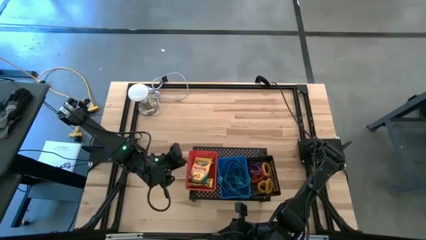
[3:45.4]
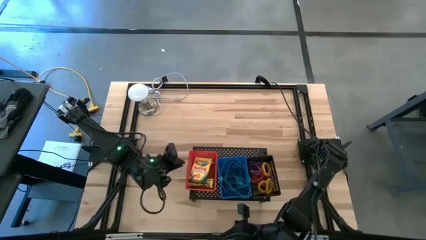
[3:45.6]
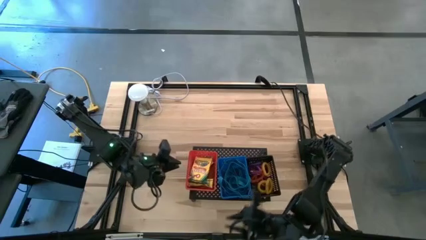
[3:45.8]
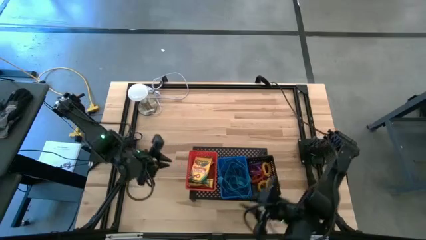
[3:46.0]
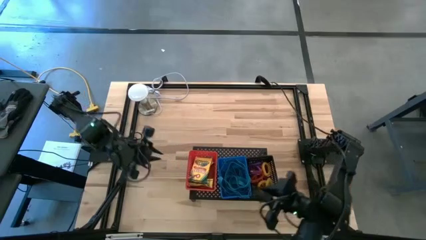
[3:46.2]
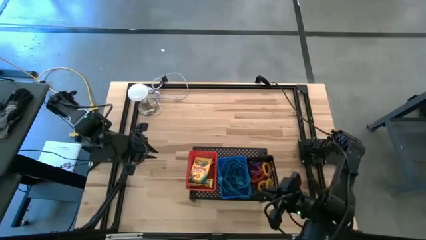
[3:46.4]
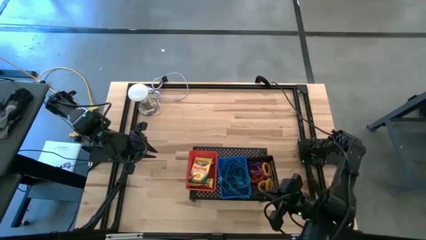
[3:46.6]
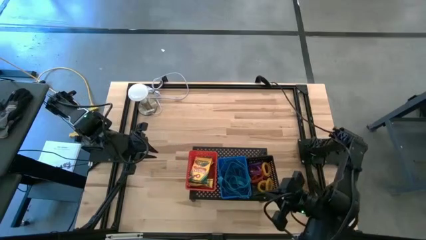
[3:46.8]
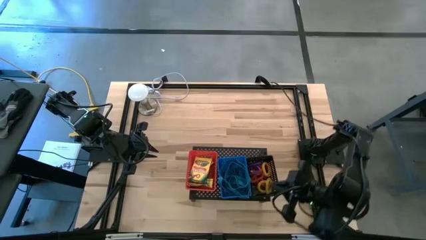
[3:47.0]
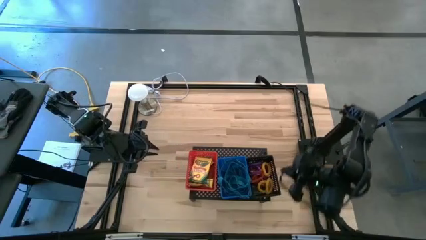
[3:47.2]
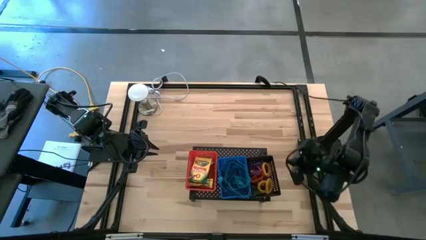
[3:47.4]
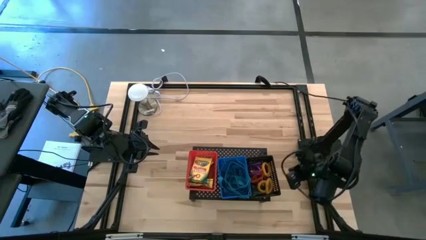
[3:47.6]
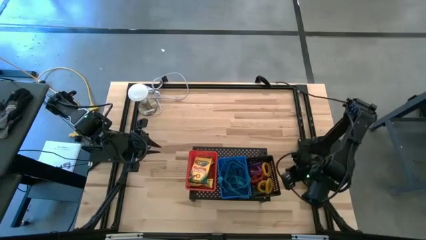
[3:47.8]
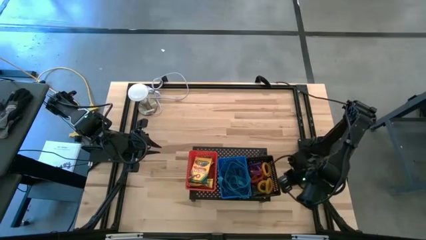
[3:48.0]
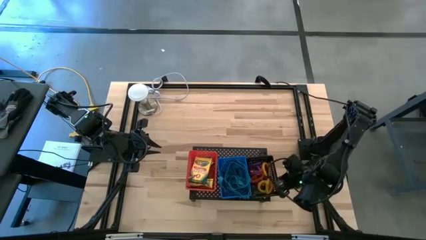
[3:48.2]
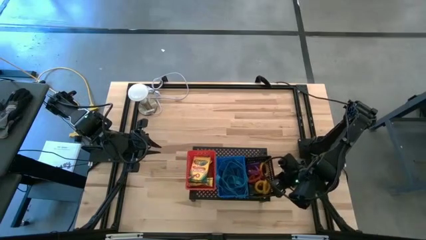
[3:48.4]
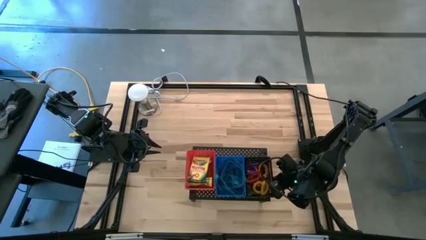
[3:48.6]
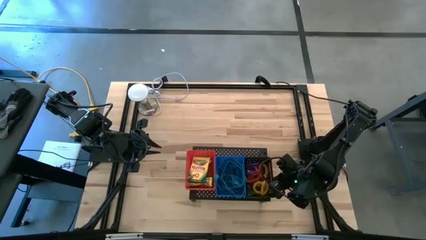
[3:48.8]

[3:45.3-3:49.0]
Task: Pick & Place Office Desk Supplies
Adjust the black bin

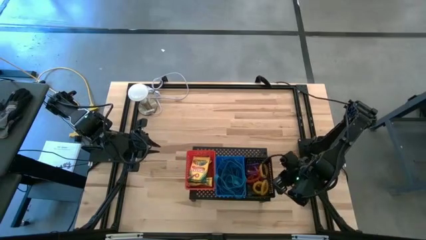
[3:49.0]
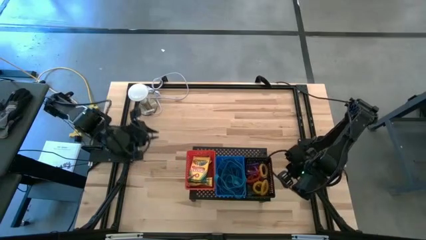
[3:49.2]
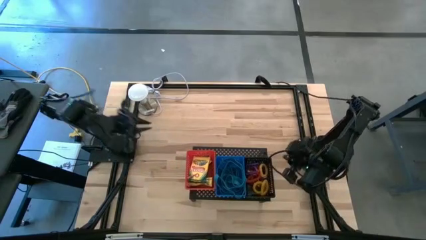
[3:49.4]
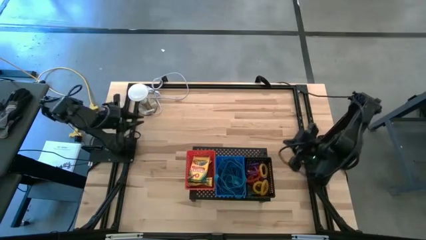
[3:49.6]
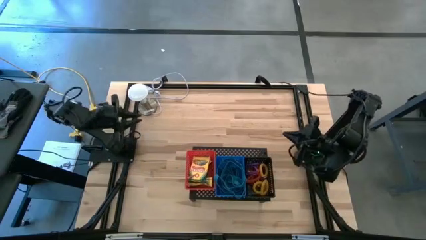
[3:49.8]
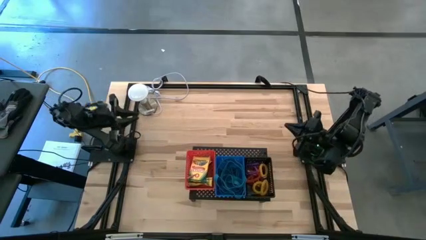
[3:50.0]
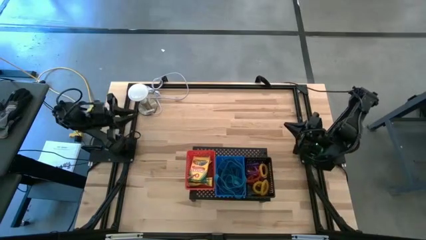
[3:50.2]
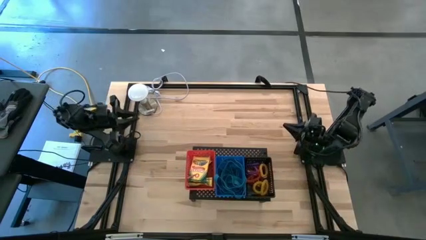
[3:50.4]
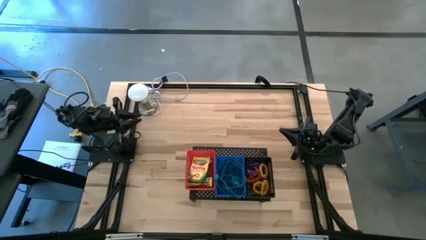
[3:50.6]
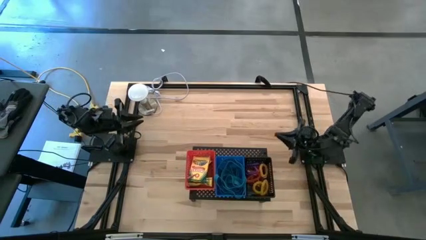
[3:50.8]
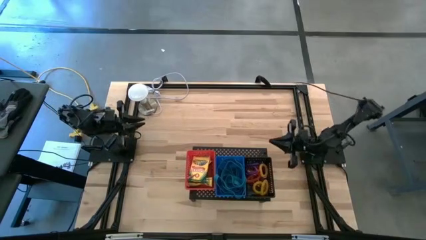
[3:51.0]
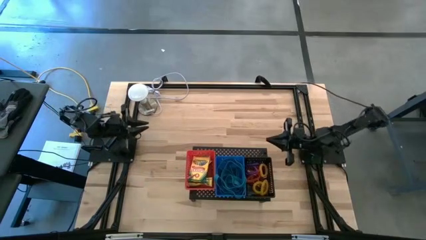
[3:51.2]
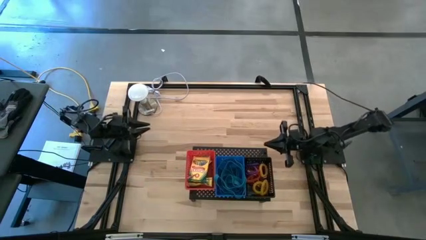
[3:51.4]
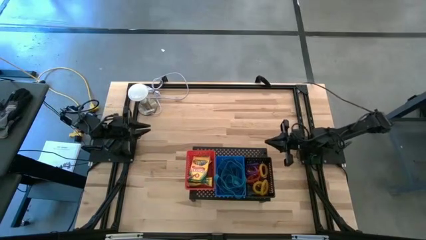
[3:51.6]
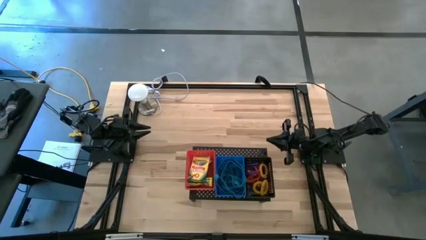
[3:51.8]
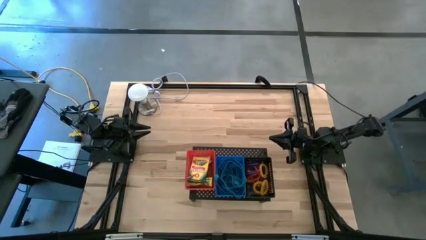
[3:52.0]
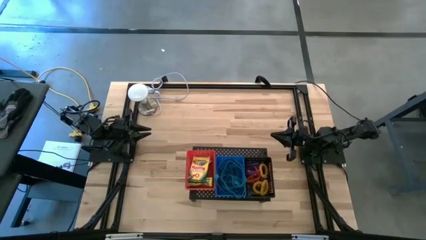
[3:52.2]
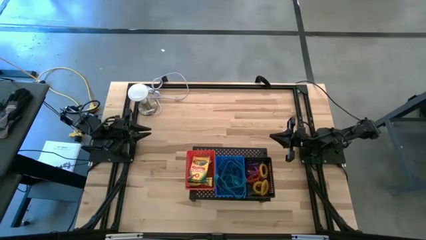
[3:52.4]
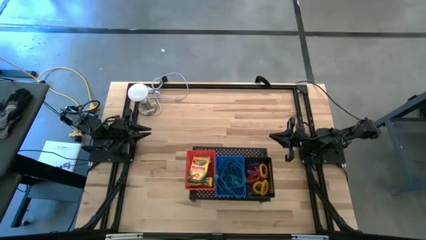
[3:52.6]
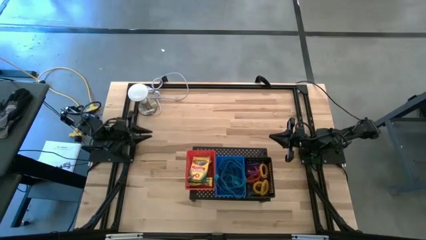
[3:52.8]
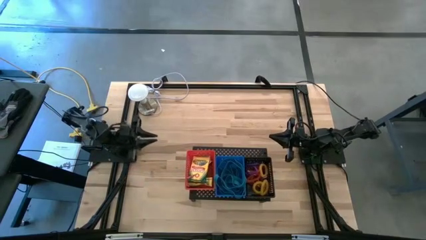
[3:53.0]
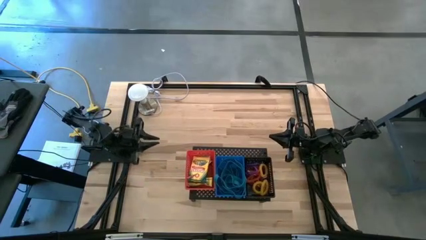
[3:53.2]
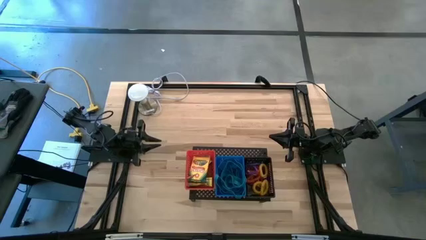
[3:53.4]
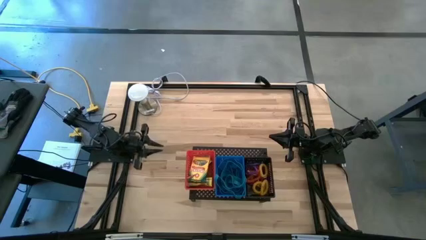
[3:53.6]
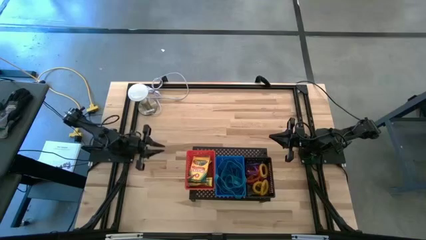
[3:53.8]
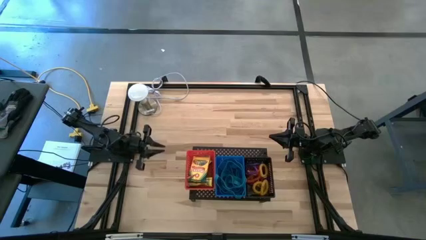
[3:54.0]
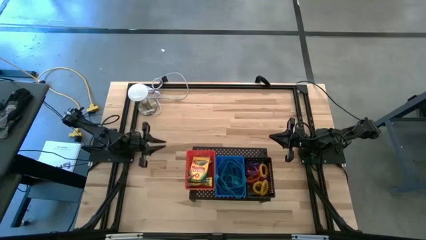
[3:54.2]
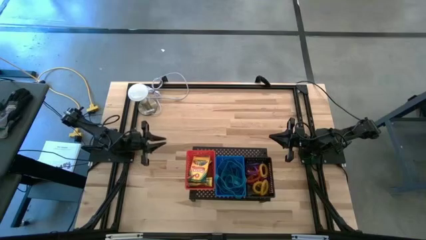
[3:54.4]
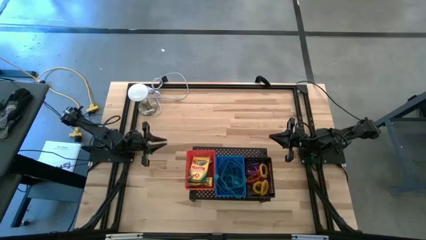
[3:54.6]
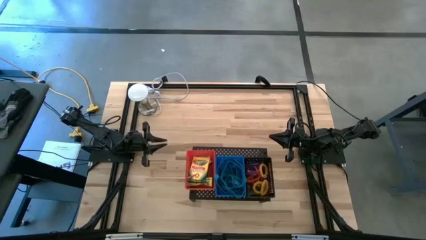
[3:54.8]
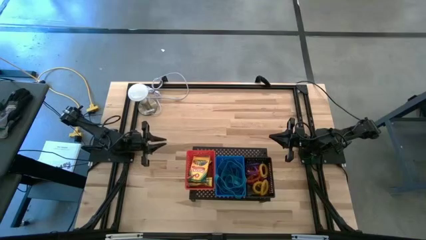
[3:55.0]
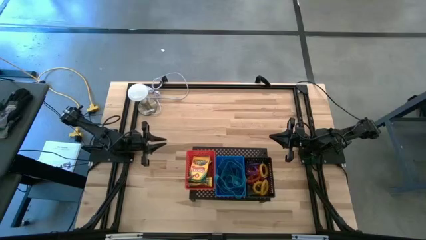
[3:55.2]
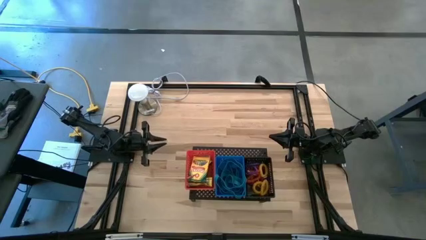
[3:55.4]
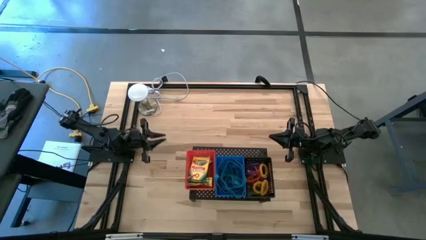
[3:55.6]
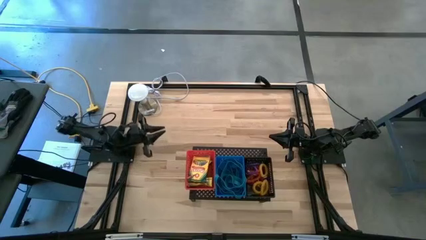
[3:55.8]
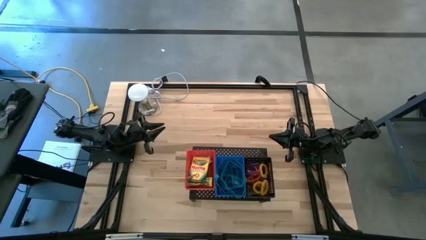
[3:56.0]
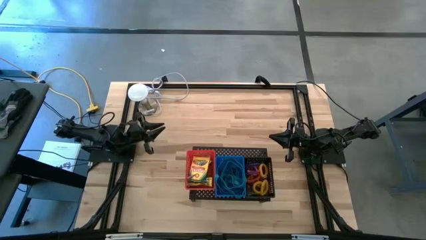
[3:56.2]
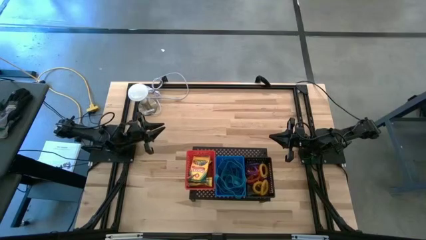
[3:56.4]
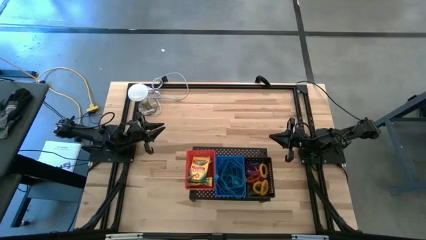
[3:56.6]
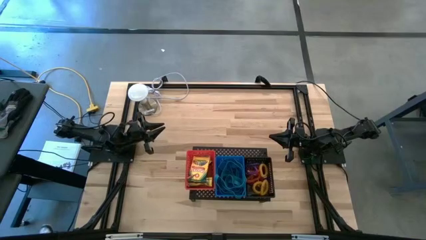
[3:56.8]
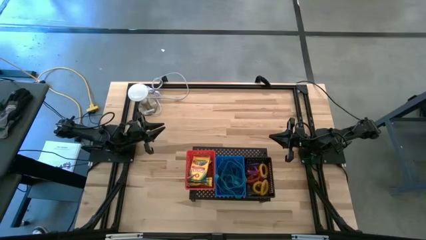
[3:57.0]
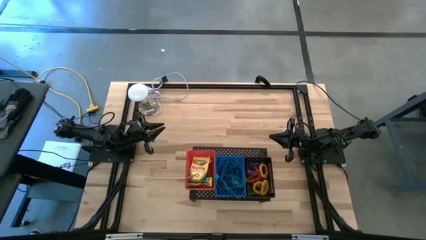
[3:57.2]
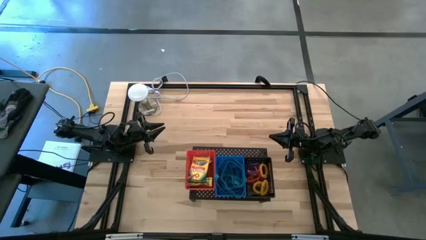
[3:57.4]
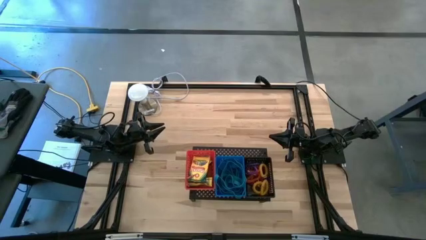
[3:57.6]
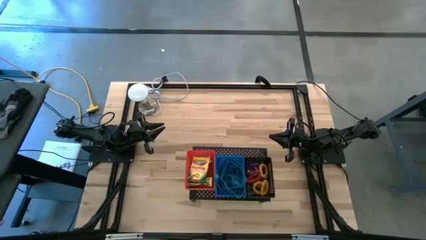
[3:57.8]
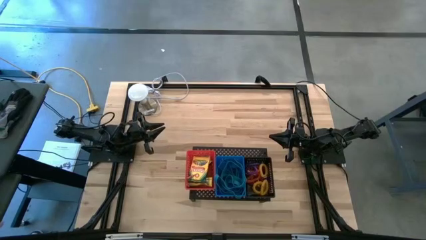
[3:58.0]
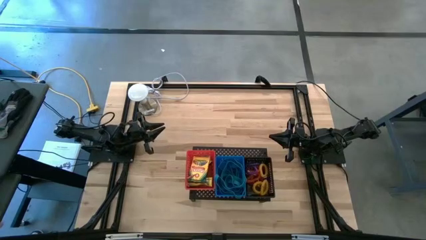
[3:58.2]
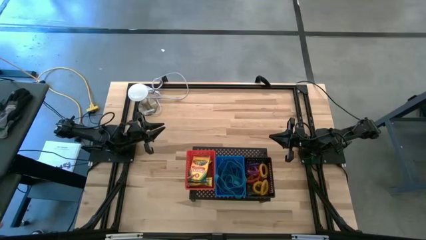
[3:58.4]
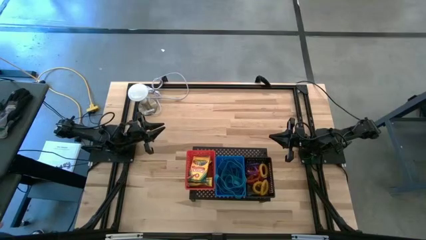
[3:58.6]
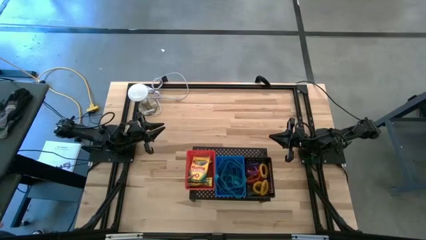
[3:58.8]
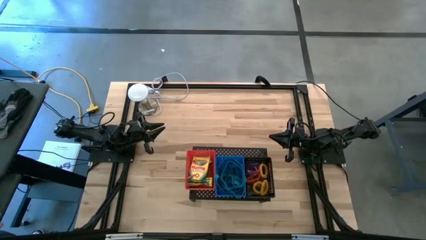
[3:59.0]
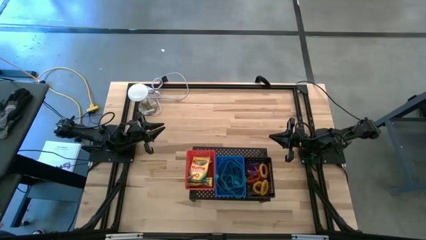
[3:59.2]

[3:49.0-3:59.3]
Return to Home Position
